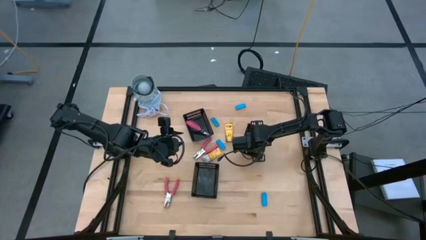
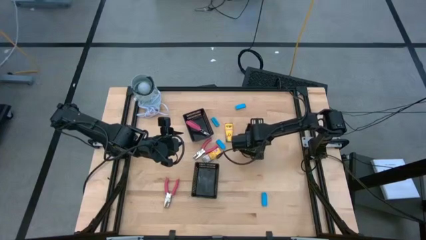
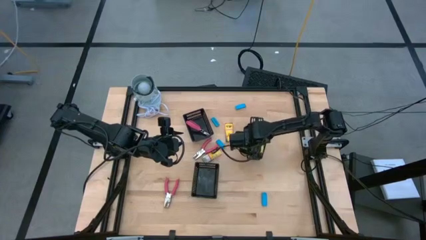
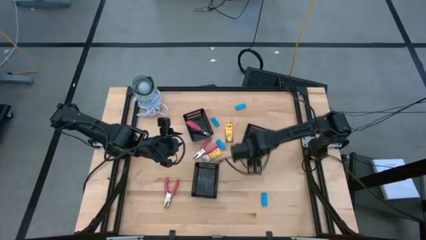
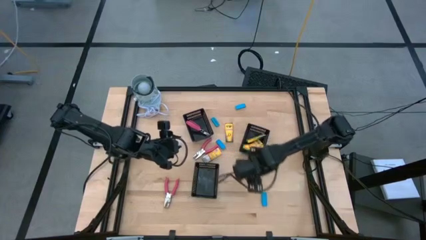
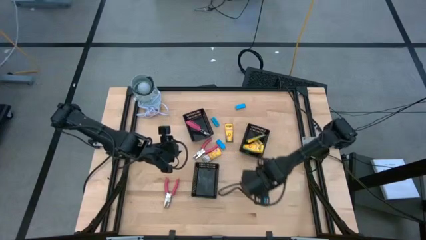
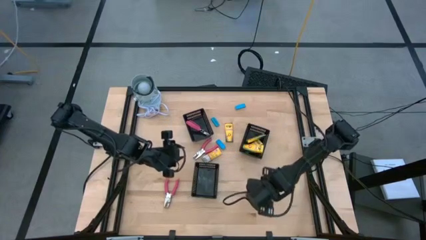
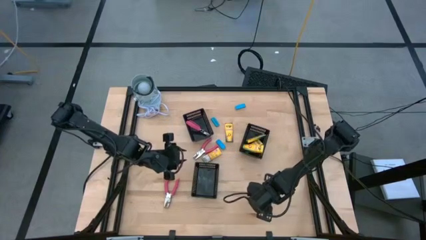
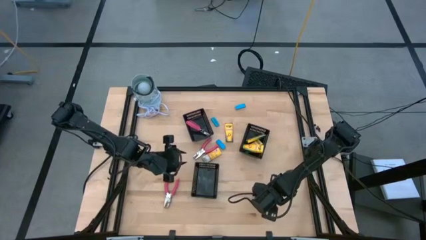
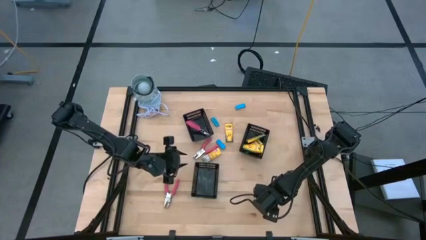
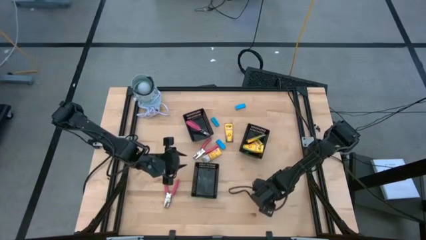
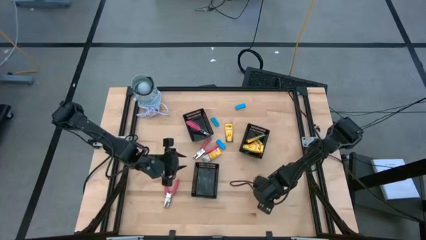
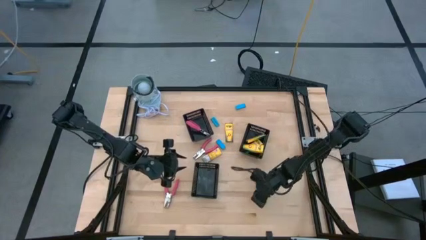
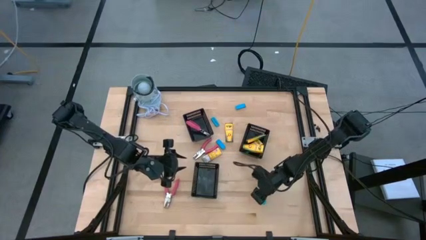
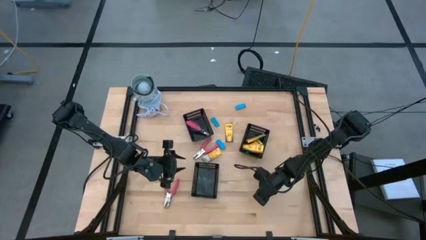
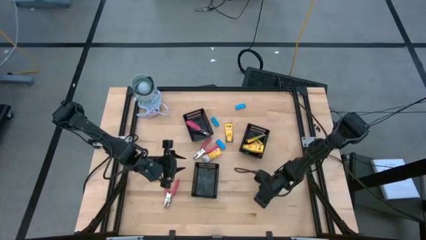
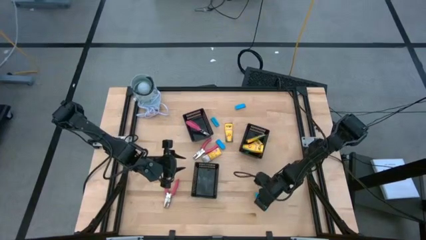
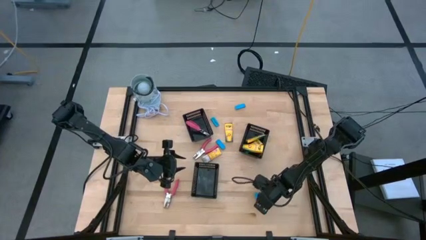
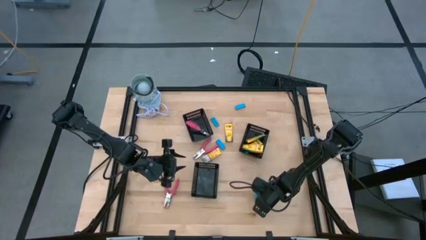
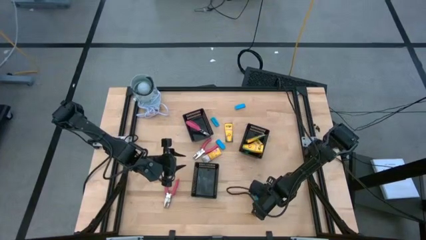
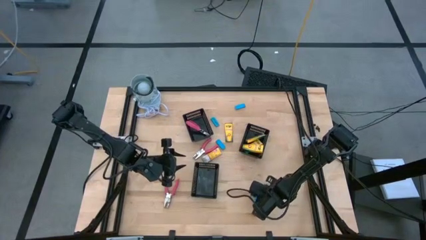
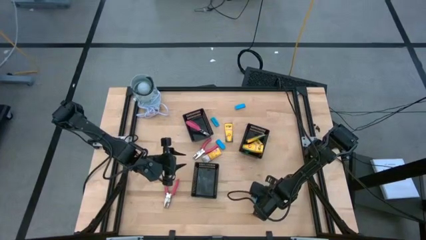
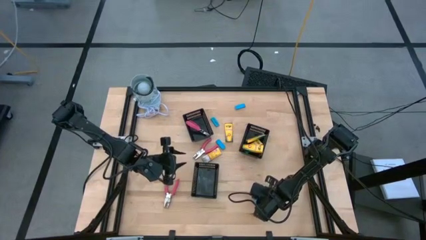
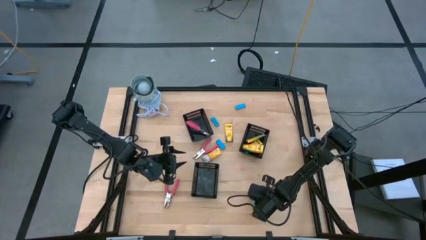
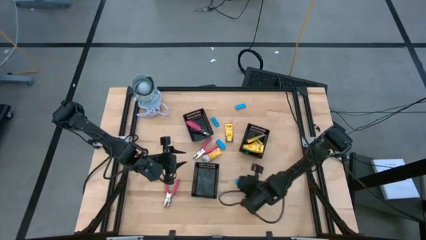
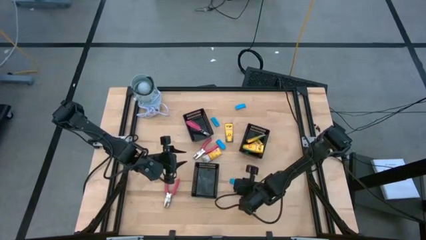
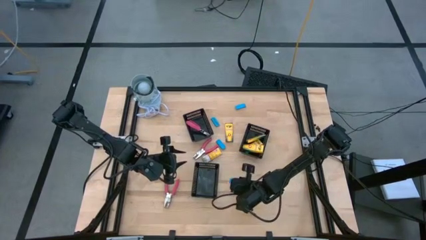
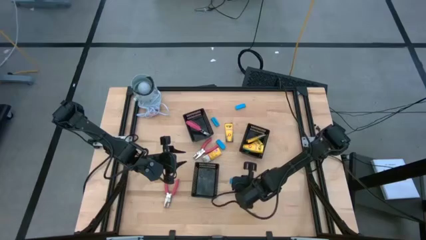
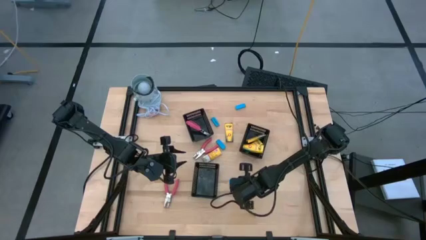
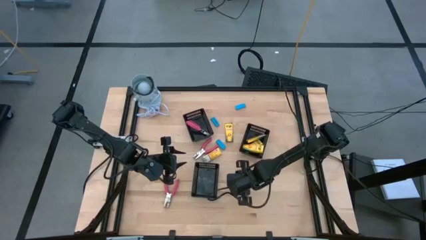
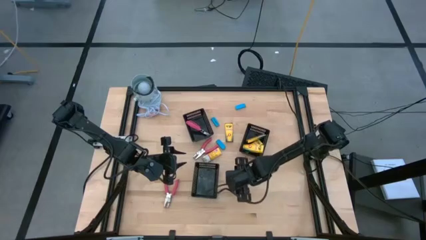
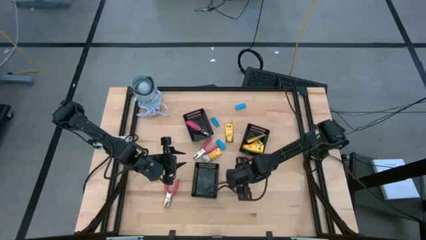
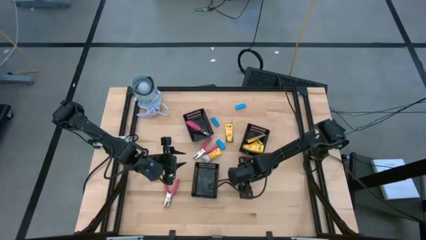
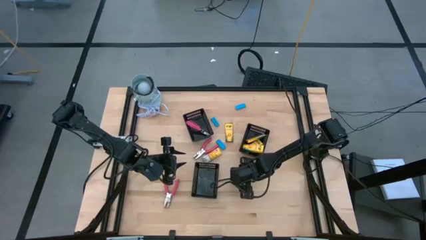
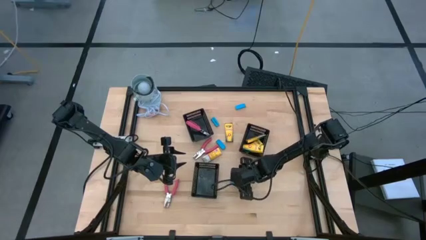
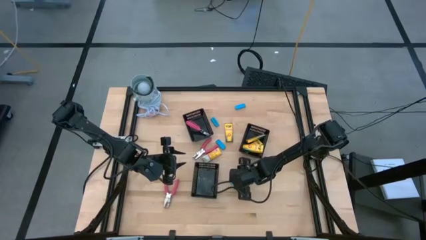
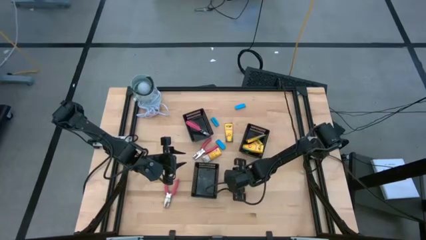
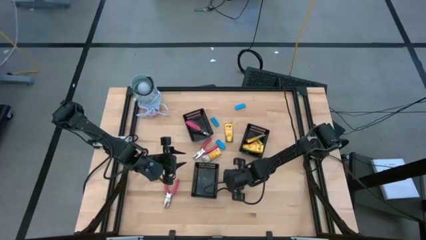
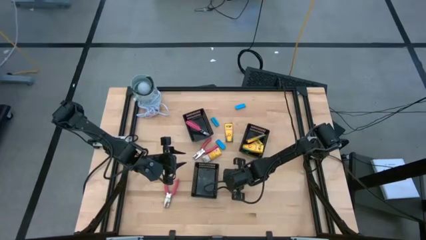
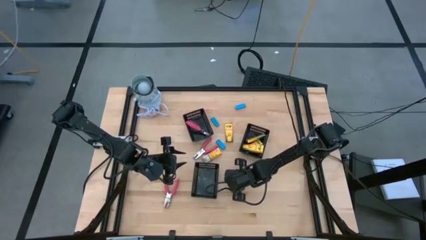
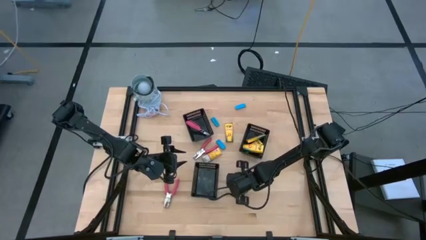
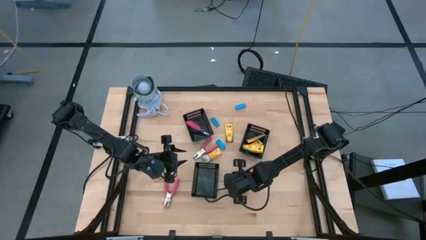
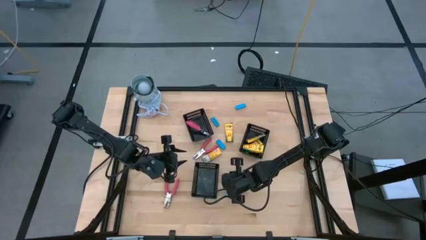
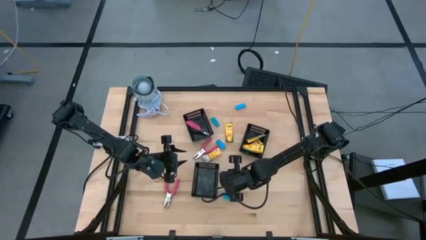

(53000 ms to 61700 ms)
Task: Pick & Place School Supplies
Put the blue eraser into the bottom left black basket

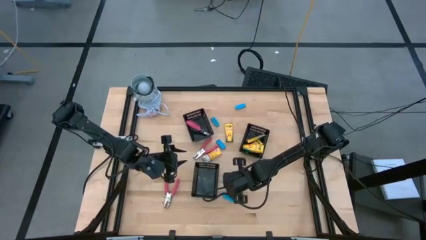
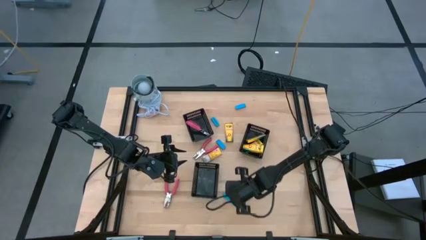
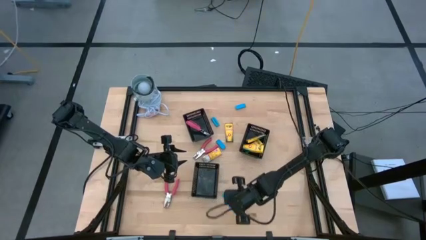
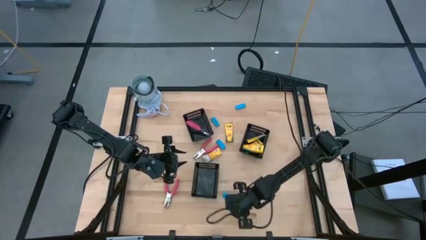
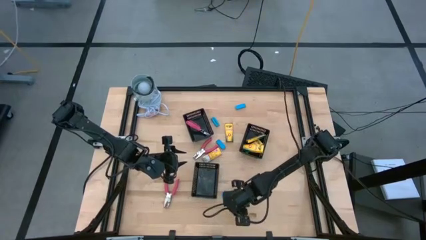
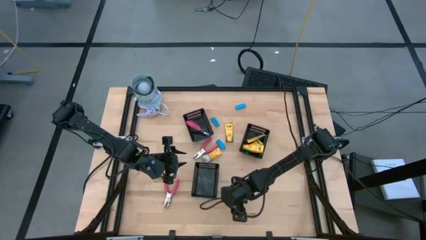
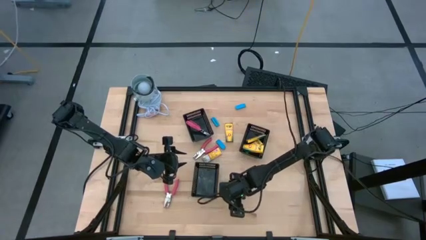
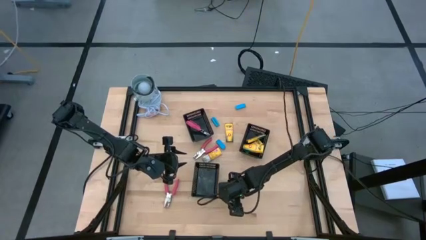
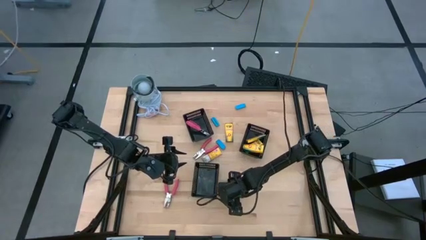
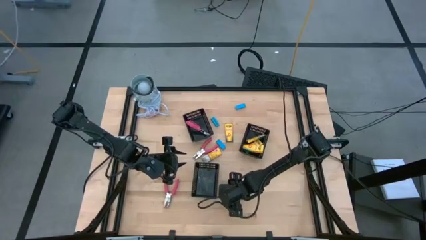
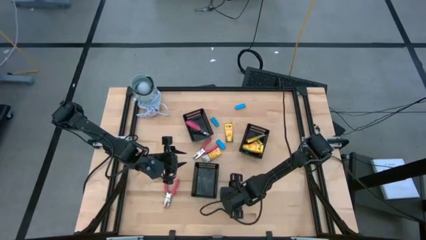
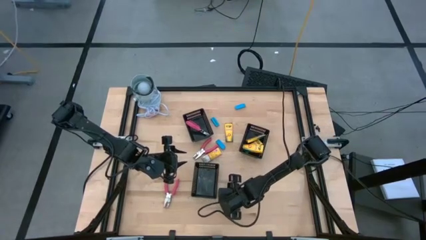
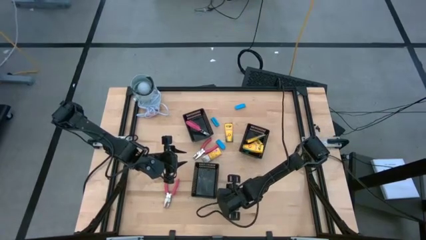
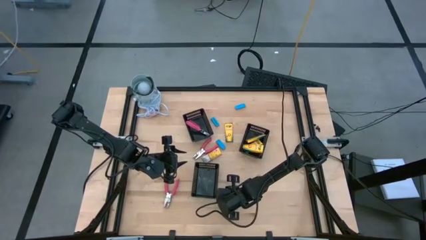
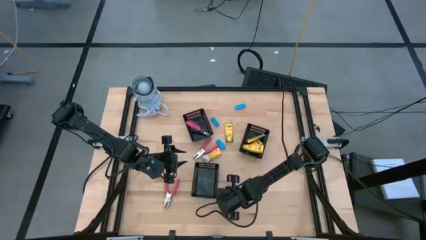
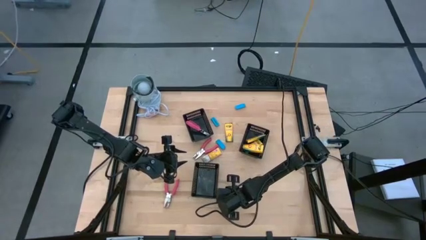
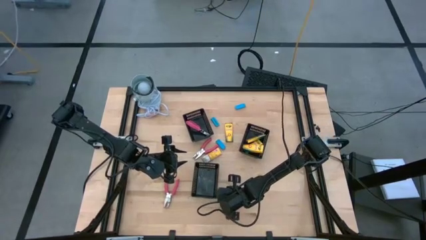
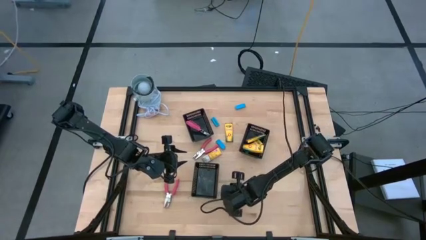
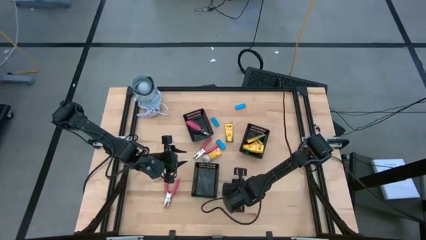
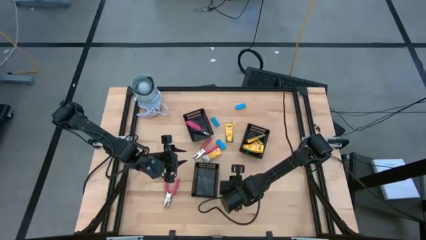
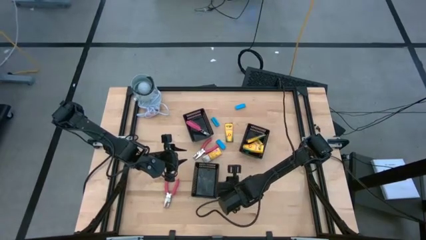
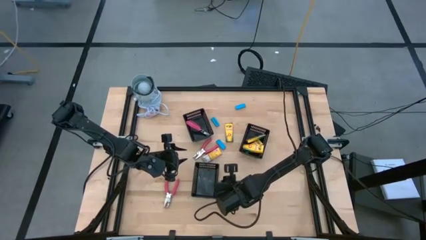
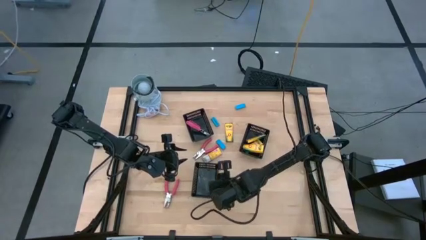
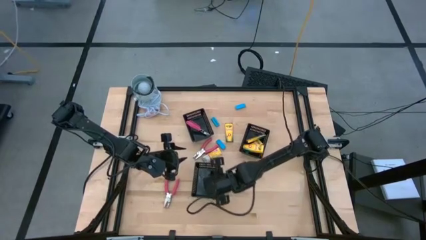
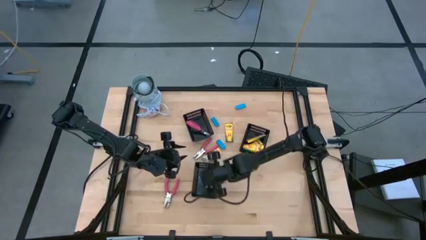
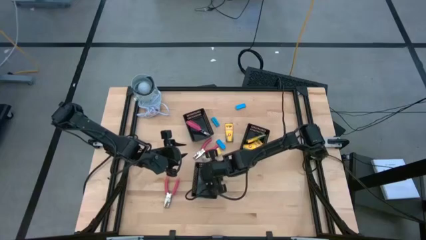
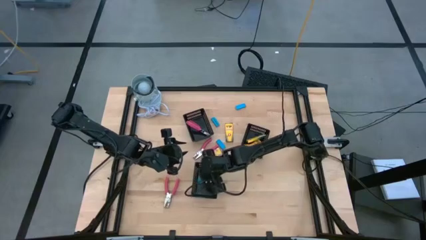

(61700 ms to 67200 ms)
Put the blue eraser into the bottom left black basket
